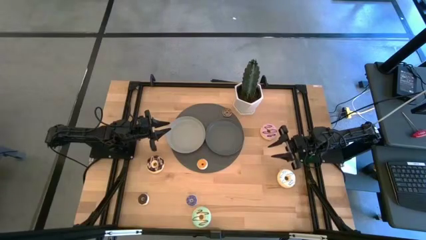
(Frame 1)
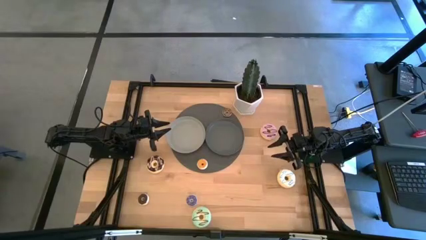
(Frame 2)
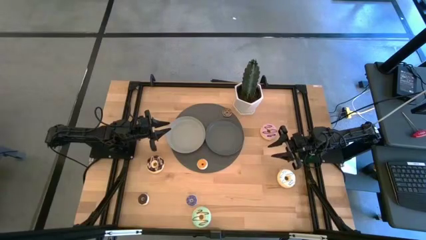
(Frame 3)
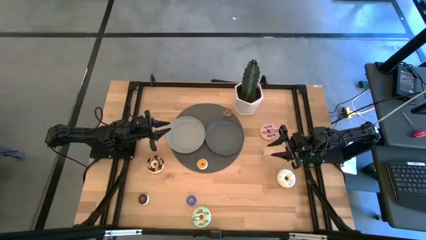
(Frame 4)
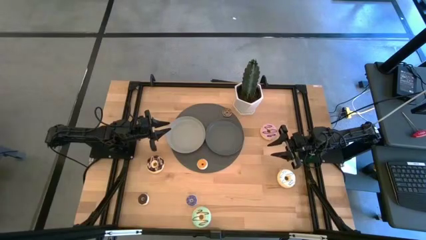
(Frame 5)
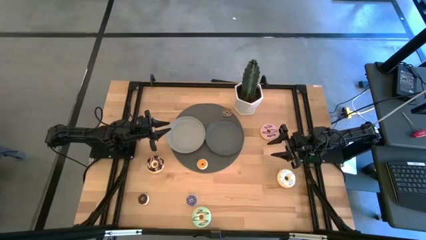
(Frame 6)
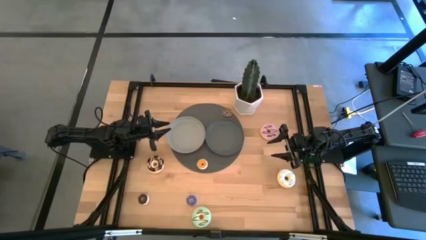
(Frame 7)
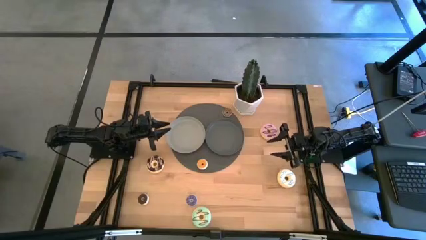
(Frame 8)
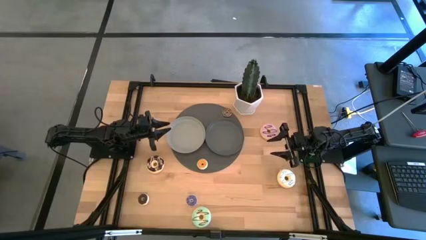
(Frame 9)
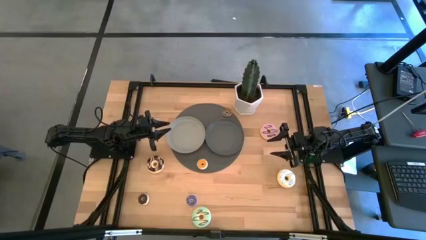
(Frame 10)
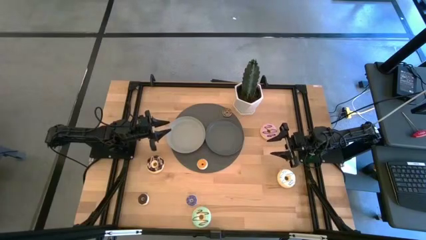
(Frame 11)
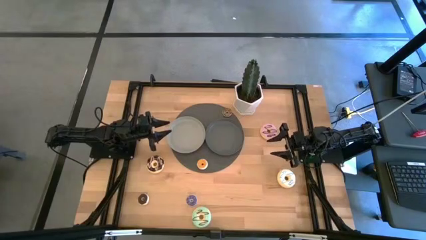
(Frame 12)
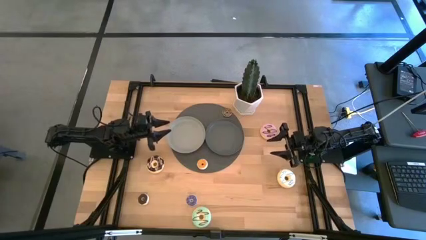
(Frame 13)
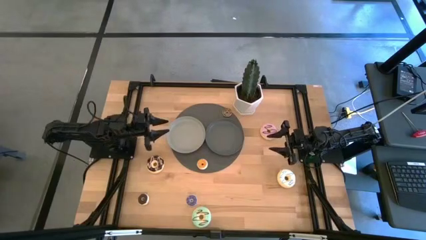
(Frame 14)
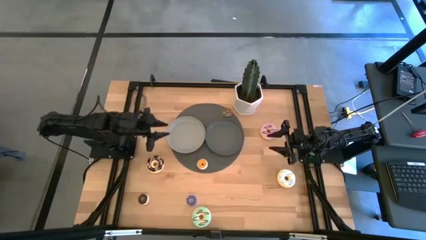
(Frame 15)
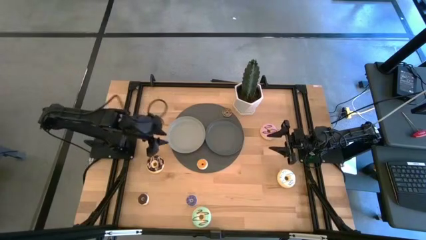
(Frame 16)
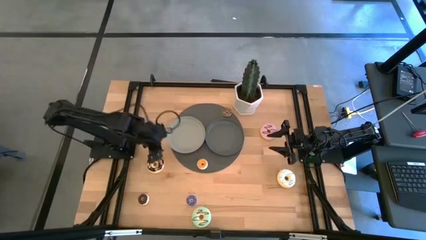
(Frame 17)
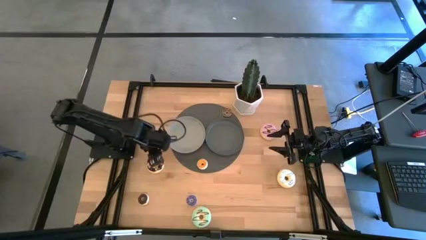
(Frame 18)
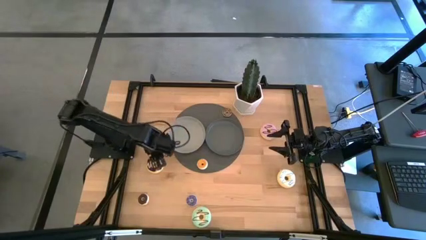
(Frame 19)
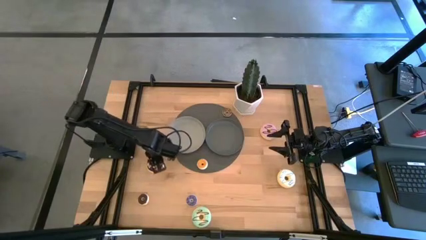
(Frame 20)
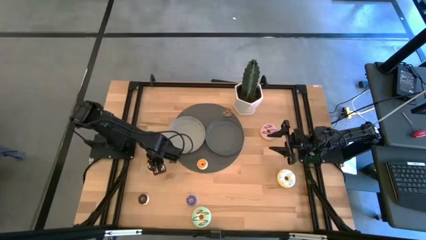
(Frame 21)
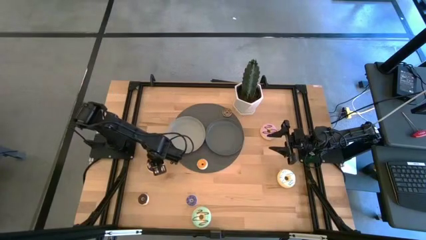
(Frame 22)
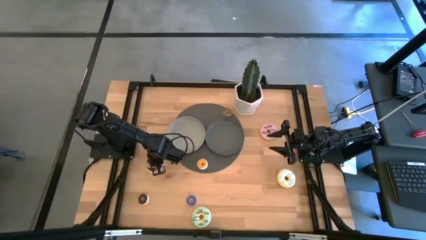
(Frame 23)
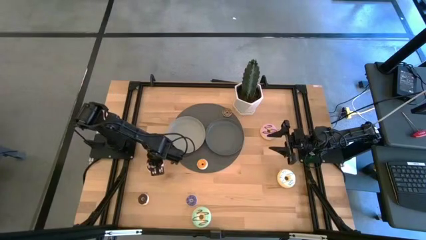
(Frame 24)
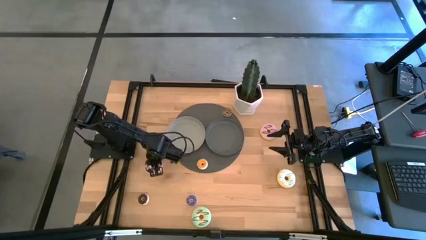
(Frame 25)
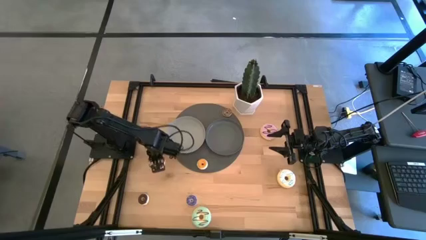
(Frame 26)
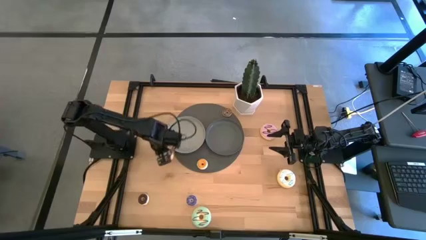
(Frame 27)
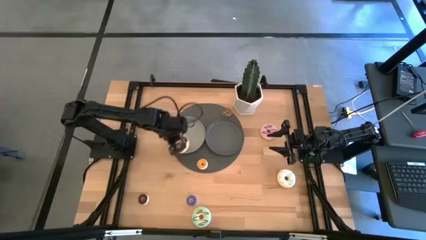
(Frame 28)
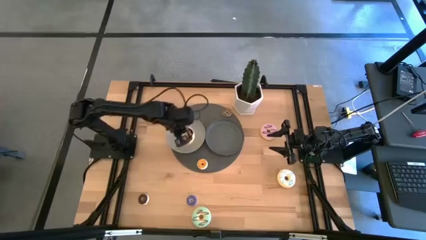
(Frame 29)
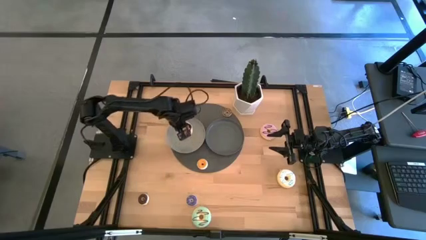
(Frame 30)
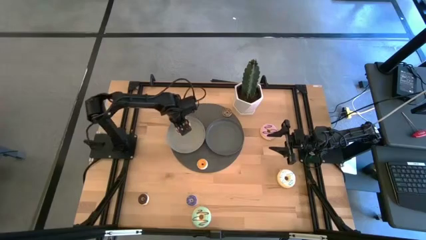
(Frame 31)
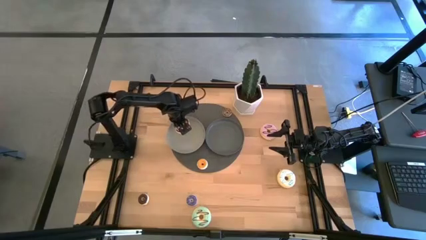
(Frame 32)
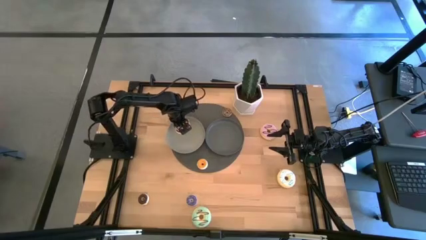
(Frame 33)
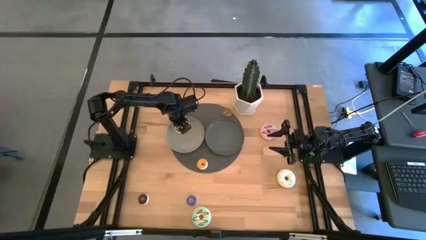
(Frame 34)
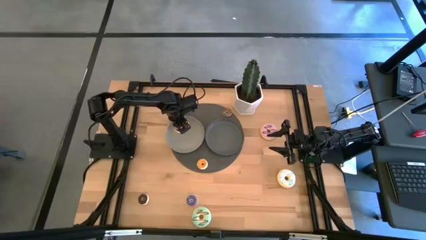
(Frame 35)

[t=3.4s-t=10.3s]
Task: Pick & Place donuts
Put the large black donut on the light gray plate

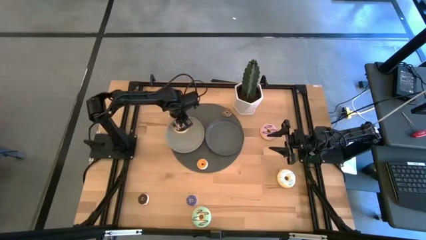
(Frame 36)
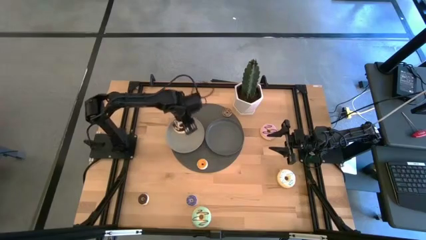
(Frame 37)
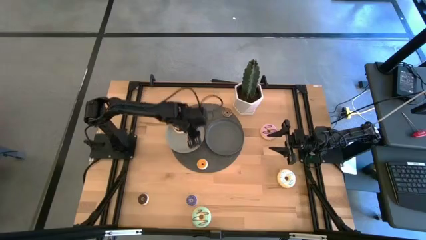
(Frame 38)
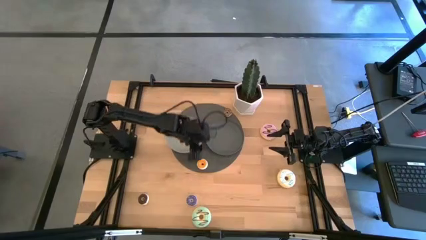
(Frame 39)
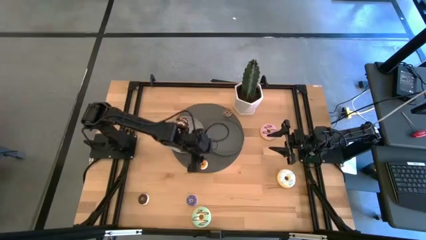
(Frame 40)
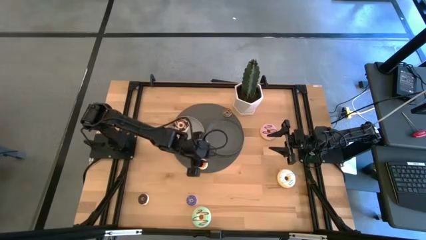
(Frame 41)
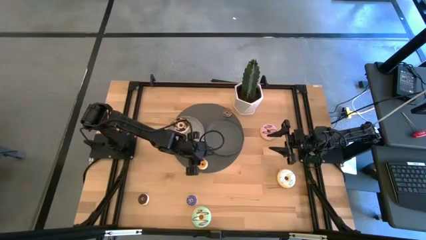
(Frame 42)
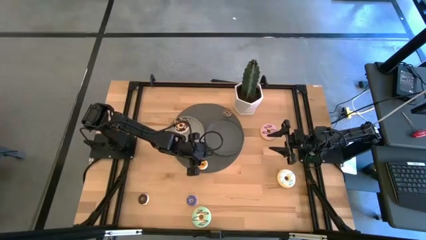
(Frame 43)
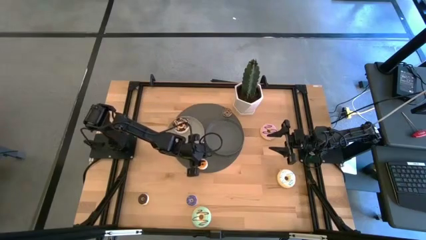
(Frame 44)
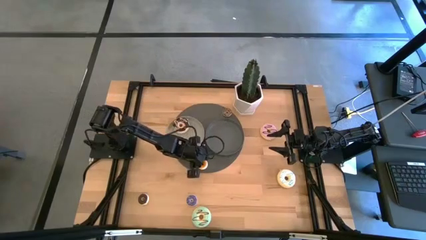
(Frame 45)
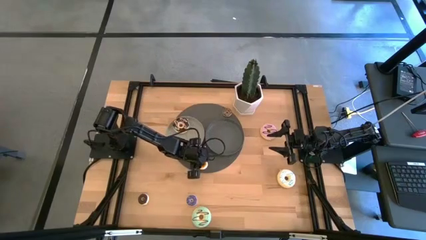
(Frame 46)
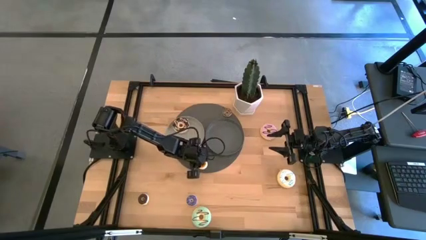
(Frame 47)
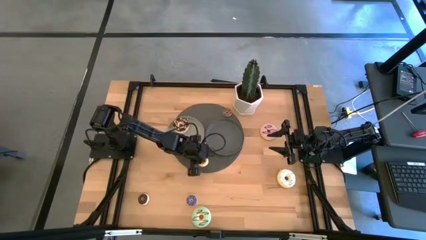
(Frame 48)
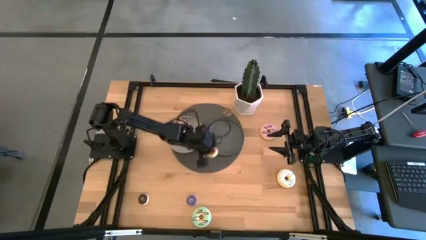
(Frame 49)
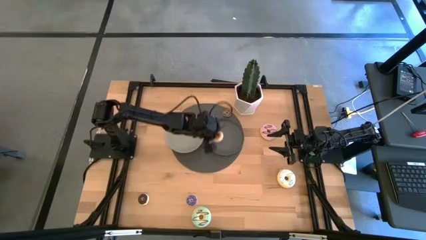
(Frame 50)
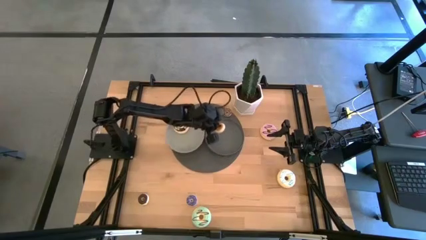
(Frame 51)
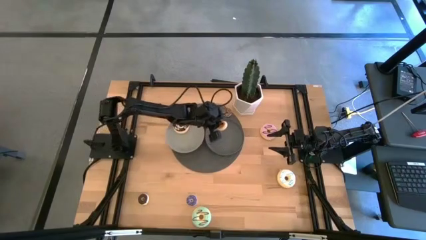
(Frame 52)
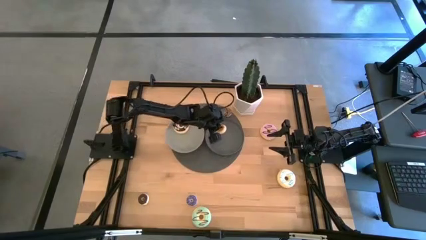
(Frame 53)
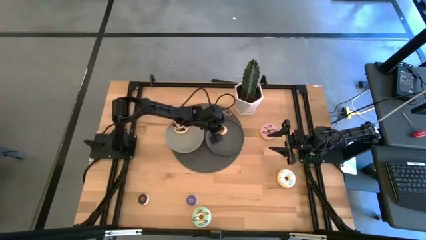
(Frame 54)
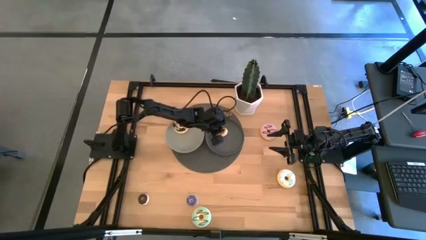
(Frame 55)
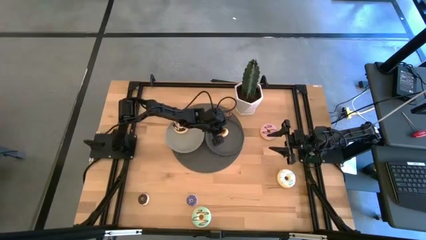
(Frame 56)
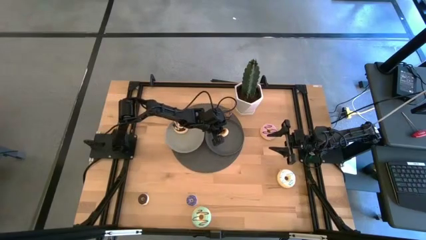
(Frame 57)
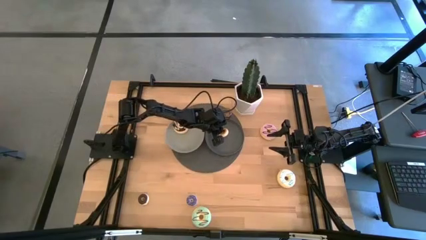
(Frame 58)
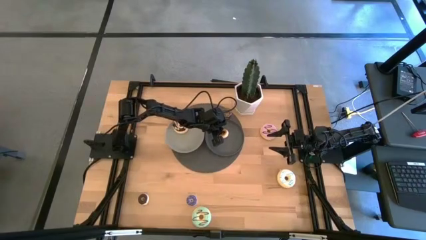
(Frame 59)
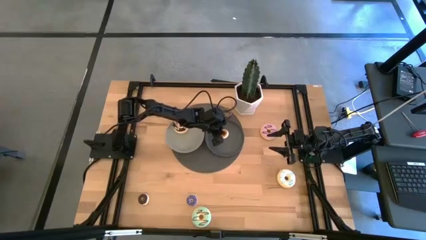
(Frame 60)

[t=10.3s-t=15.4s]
Put the small yellow donut on the dark gray plate

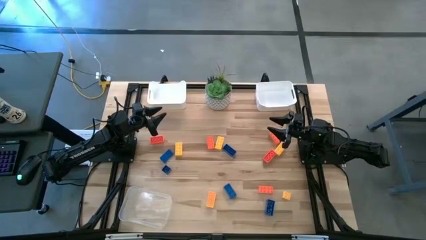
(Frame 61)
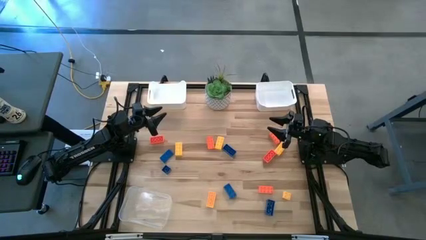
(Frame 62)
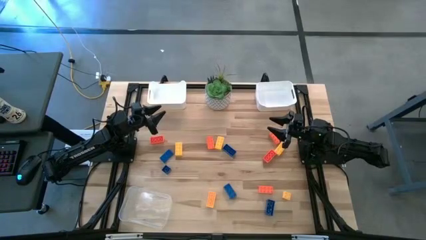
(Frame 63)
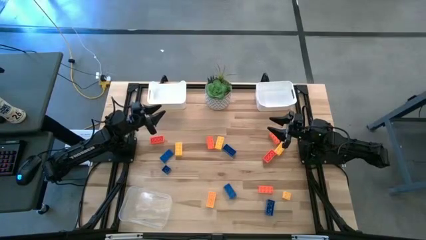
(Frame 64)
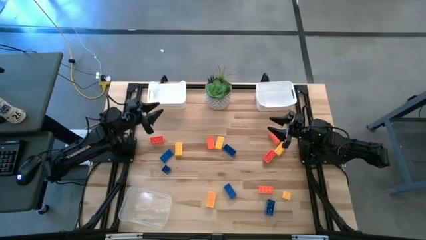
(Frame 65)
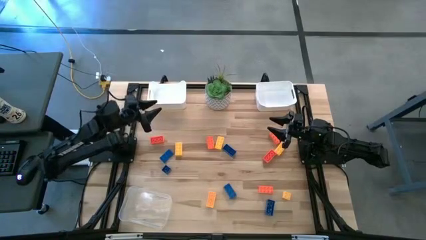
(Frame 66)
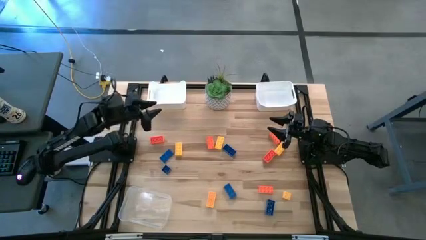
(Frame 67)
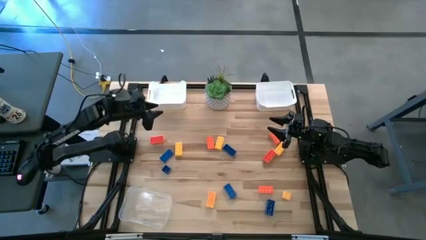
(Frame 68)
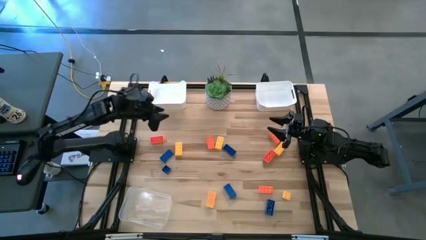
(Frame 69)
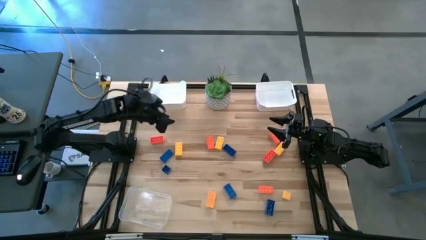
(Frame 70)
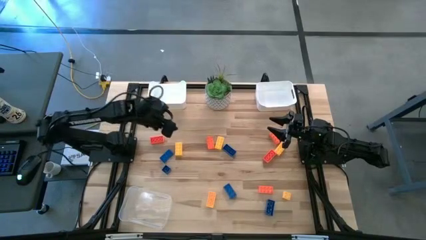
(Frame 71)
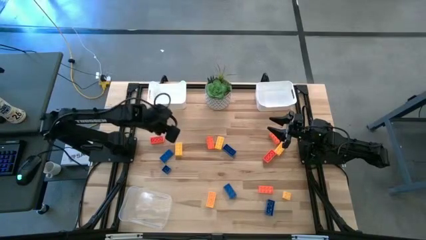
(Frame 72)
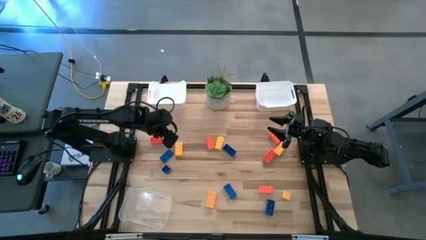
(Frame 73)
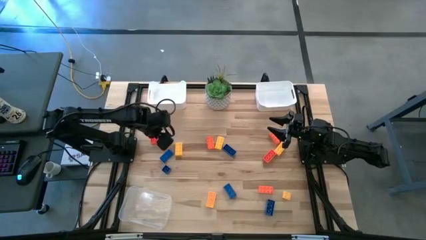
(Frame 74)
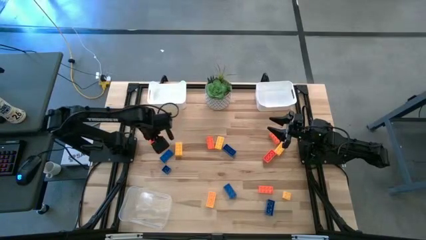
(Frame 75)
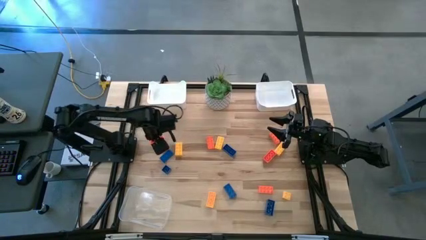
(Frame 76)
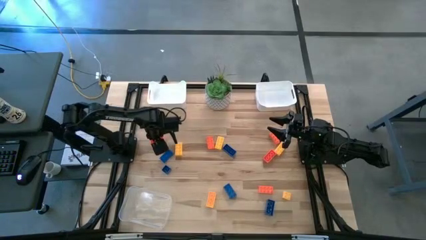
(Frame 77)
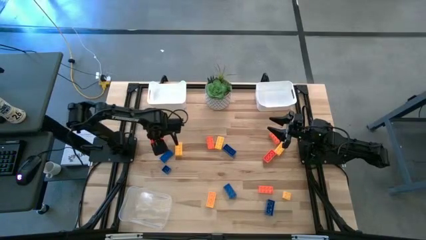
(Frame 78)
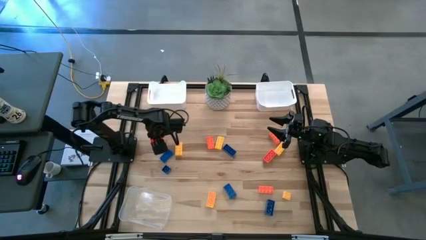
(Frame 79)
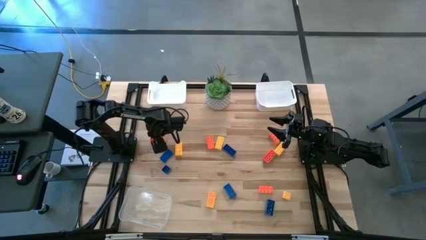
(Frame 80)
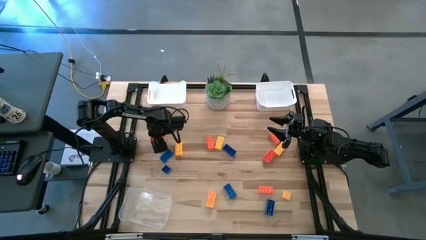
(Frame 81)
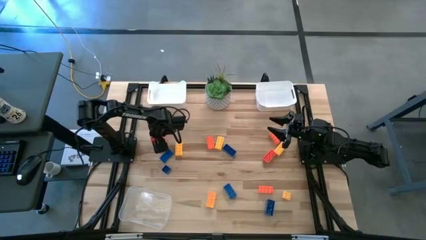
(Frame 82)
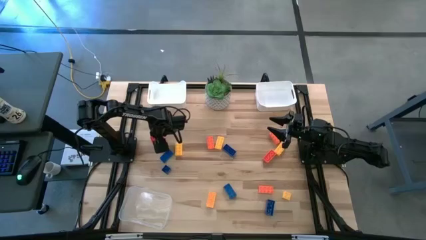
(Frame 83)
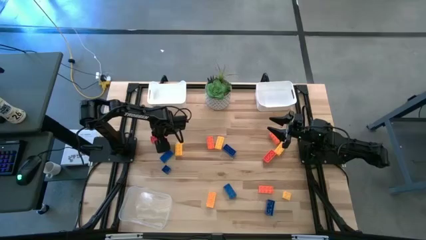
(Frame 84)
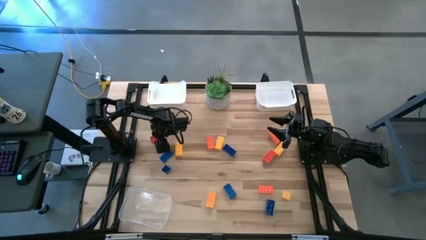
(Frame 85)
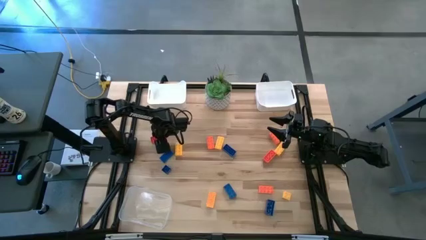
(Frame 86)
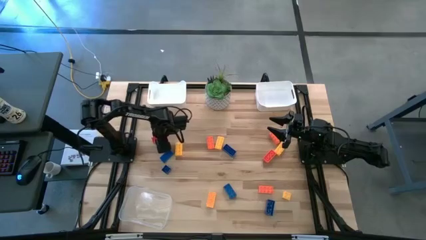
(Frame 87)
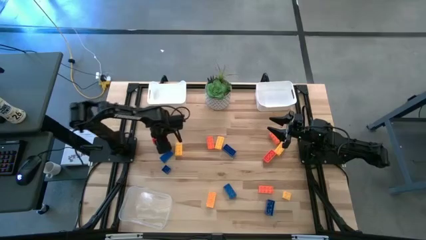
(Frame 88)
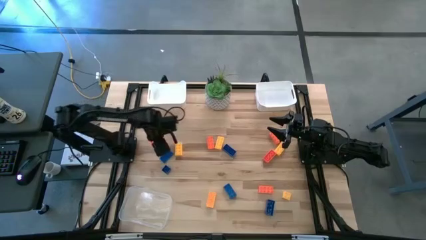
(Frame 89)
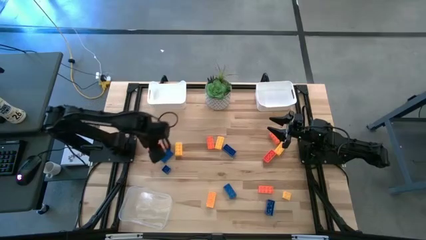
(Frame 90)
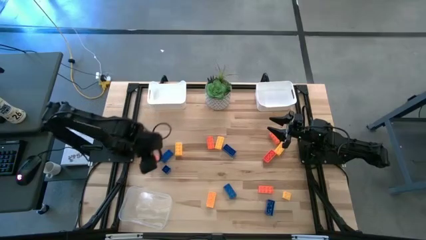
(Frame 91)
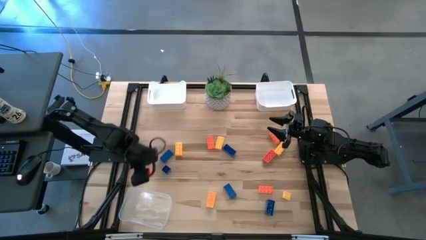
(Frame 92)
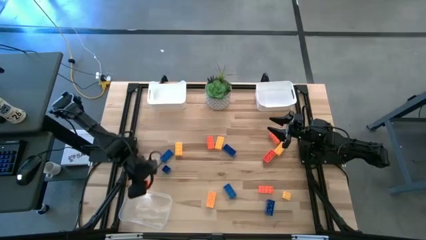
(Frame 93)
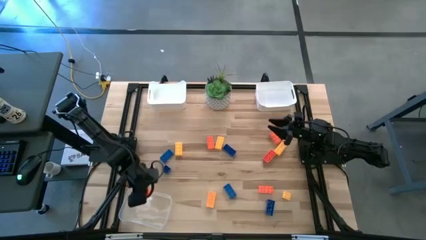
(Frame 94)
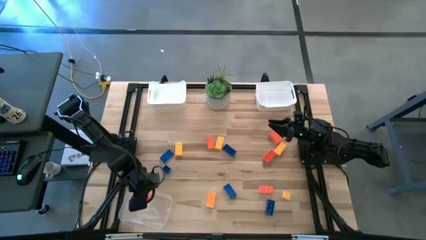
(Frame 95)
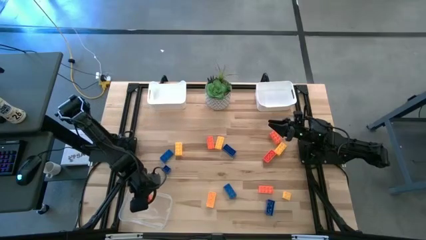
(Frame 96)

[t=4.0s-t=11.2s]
Task: Sort & place blocks by color
Put the orange game piece into the transparent bin
